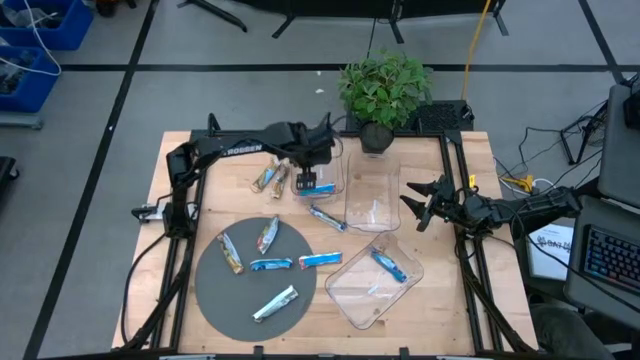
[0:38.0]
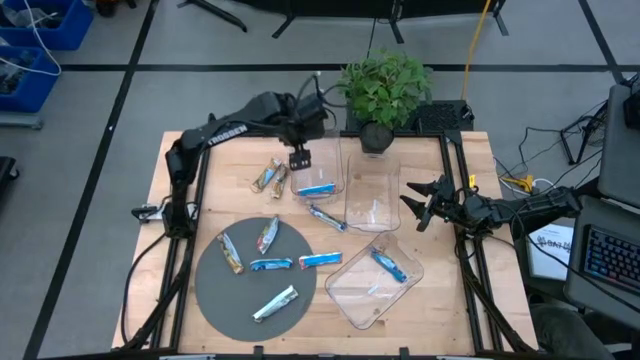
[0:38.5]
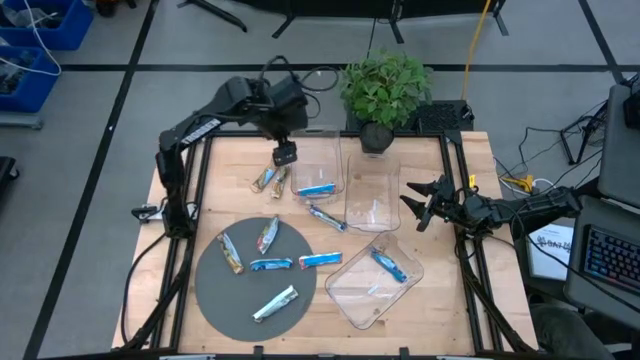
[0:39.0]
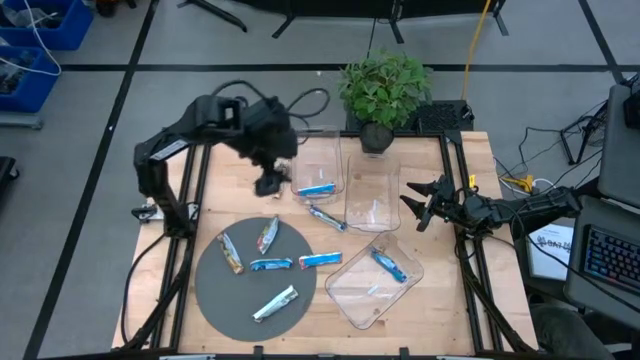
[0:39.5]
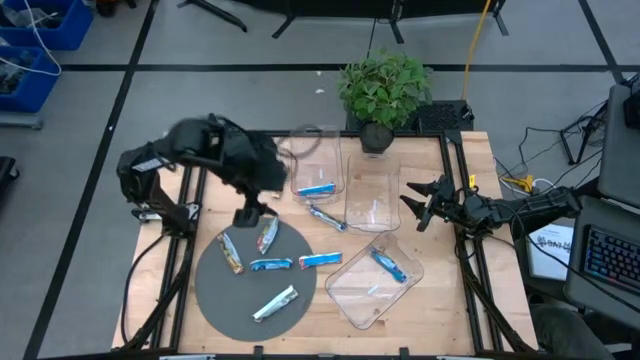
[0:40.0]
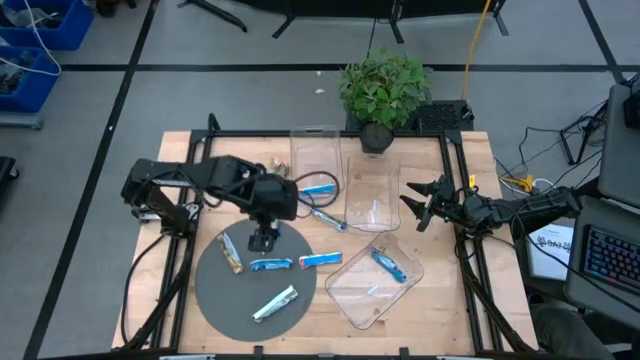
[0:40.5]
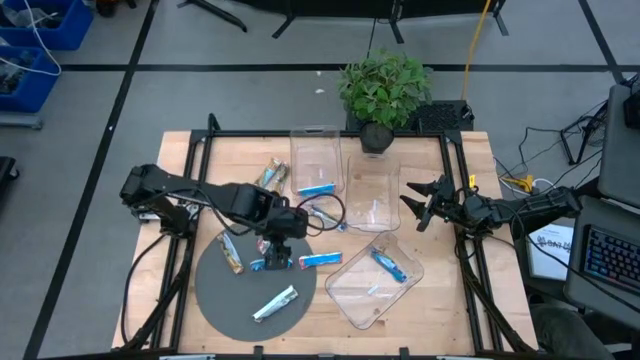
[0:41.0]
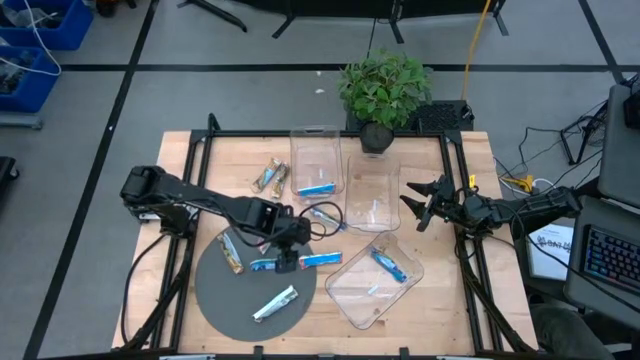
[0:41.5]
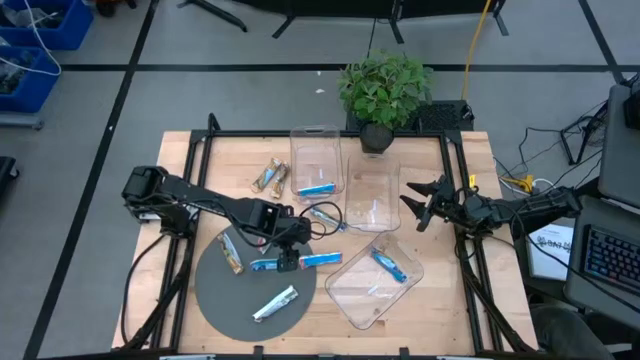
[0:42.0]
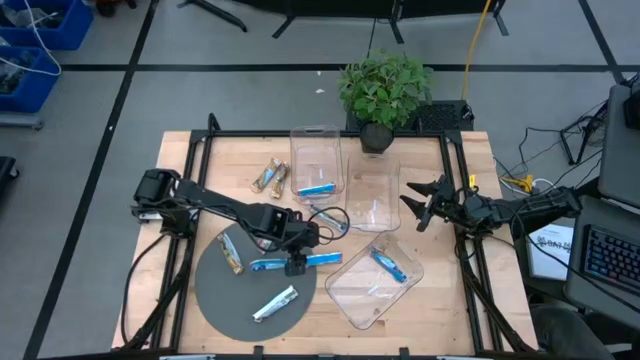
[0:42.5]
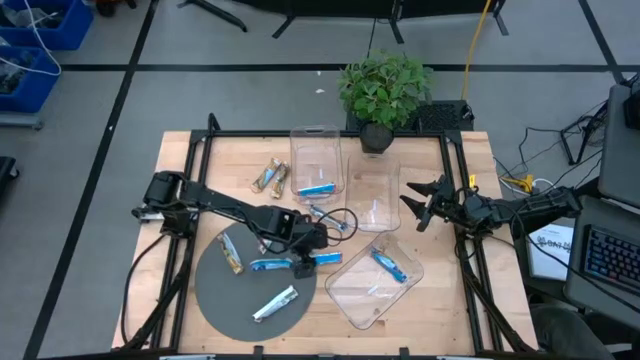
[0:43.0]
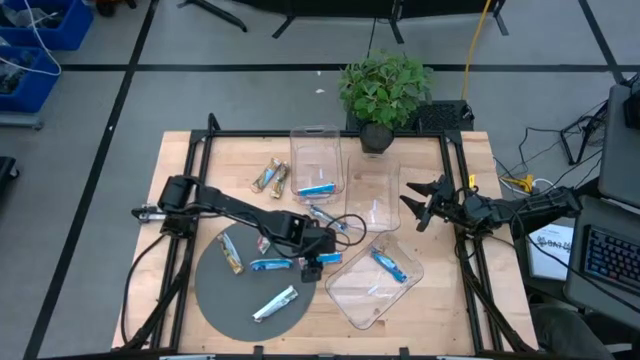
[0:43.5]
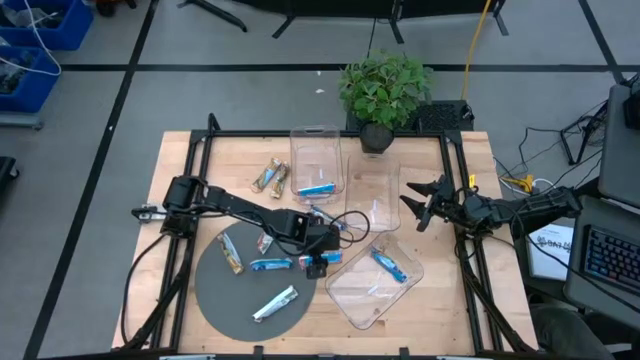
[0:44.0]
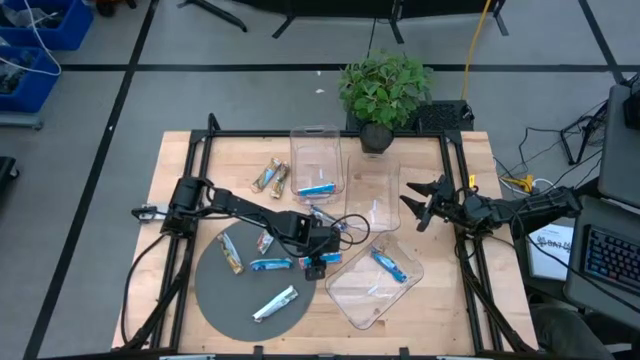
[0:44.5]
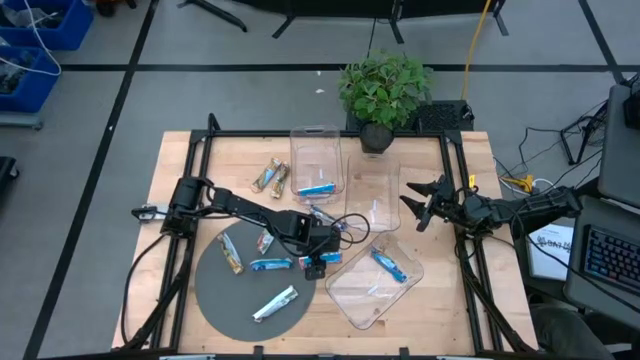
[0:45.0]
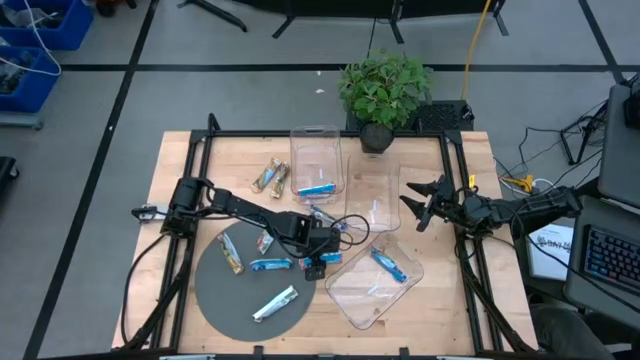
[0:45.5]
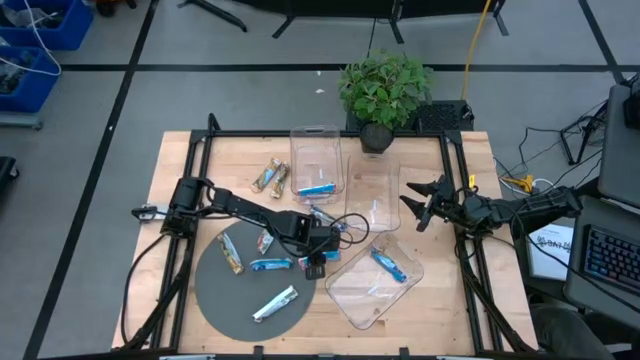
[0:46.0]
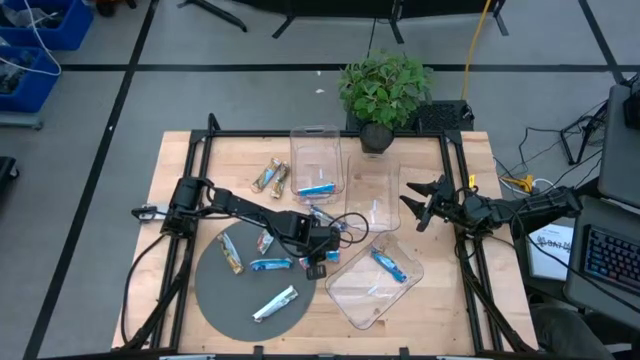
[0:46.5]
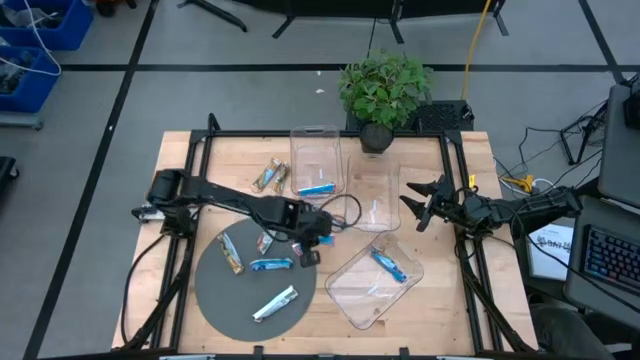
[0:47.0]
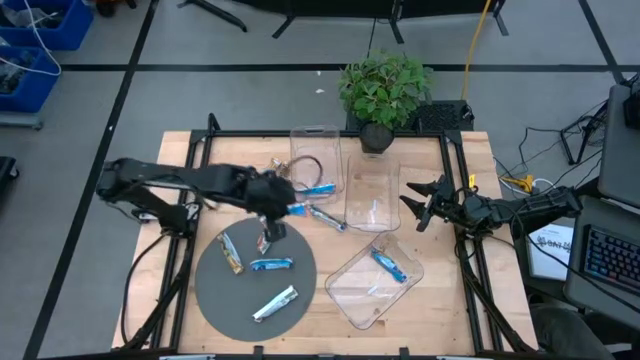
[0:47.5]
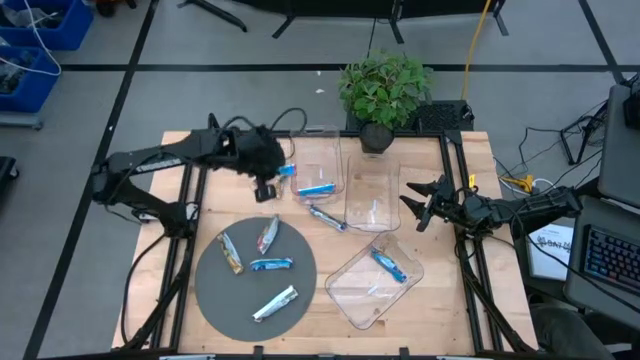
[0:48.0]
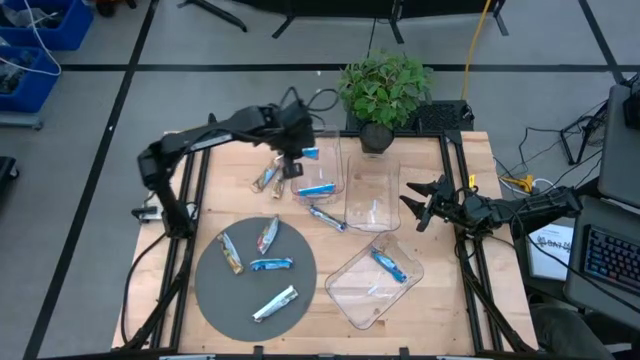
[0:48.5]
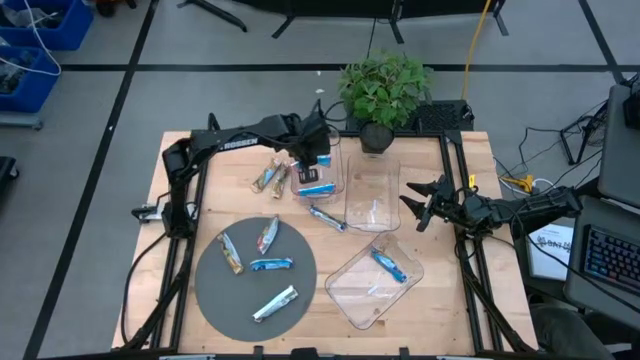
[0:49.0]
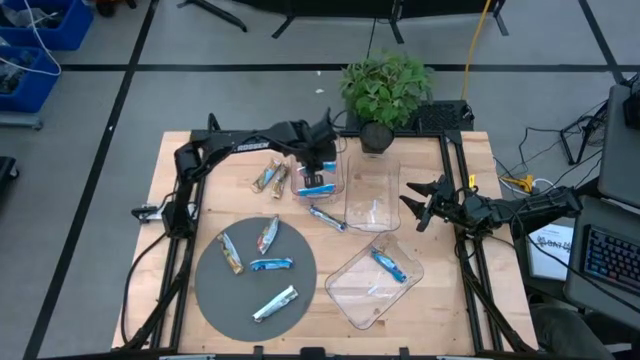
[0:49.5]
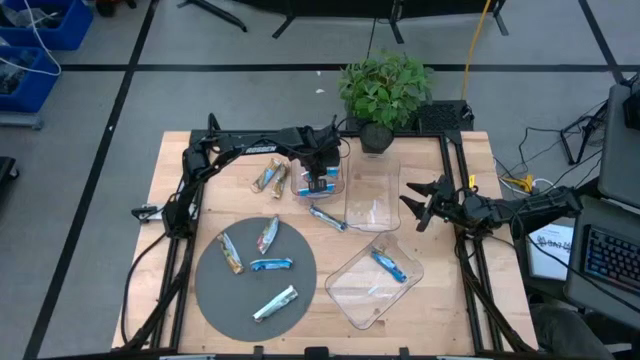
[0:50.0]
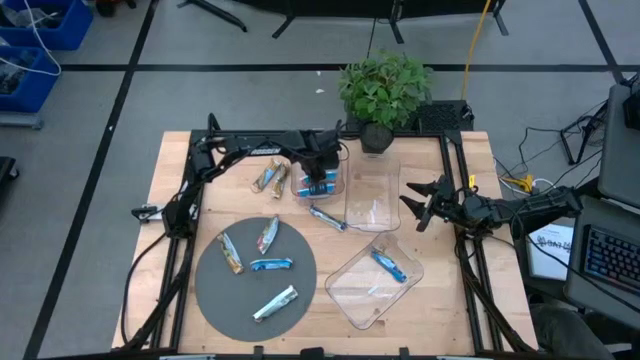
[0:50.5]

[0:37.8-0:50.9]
Task: Pick and place Granola Bars by type
Put the red granola bar into the top transparent bin

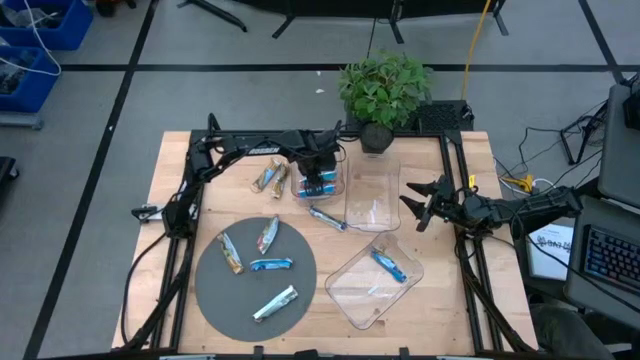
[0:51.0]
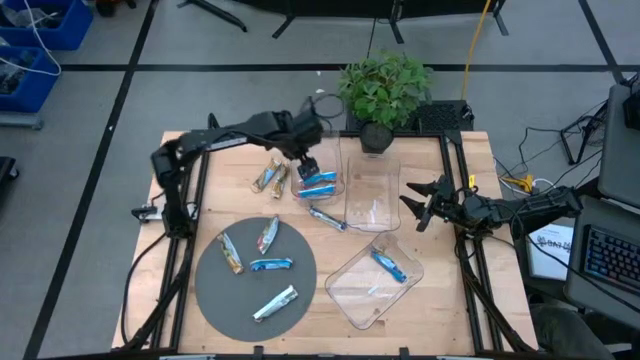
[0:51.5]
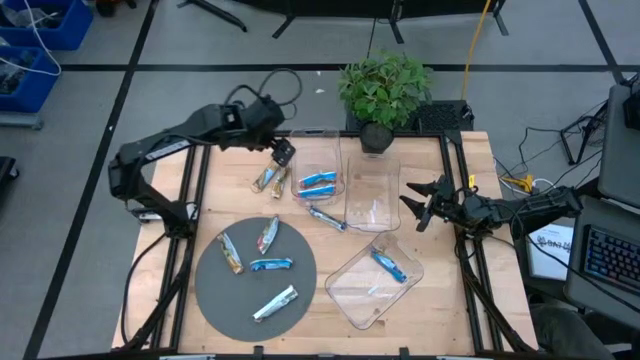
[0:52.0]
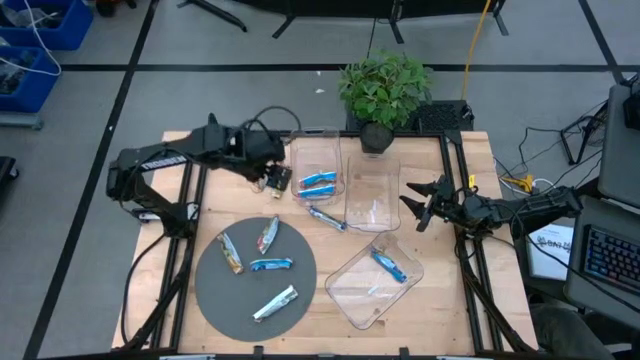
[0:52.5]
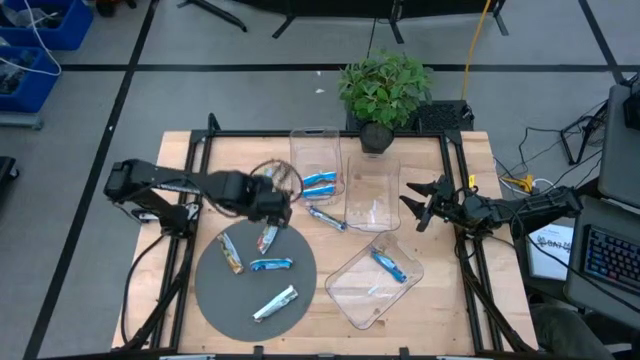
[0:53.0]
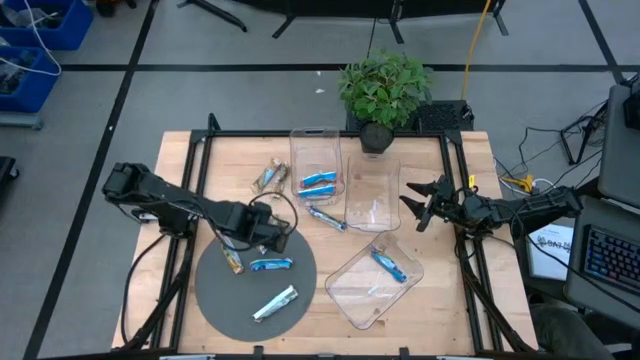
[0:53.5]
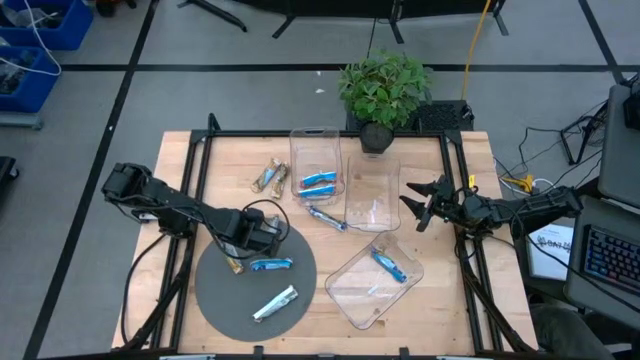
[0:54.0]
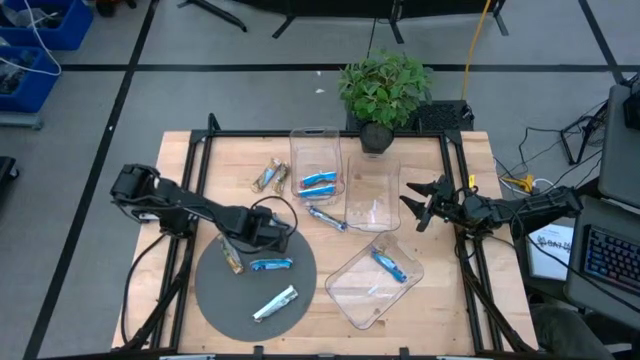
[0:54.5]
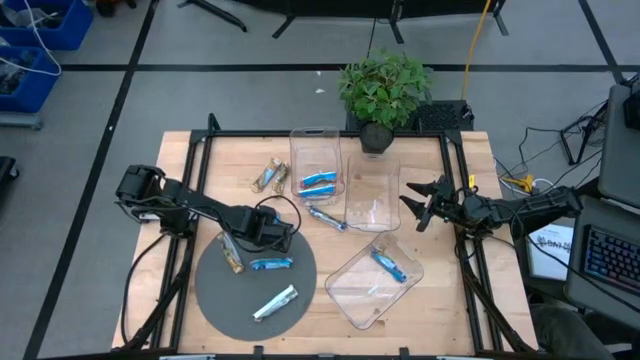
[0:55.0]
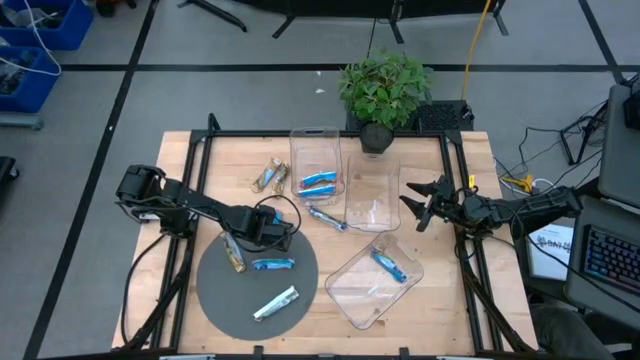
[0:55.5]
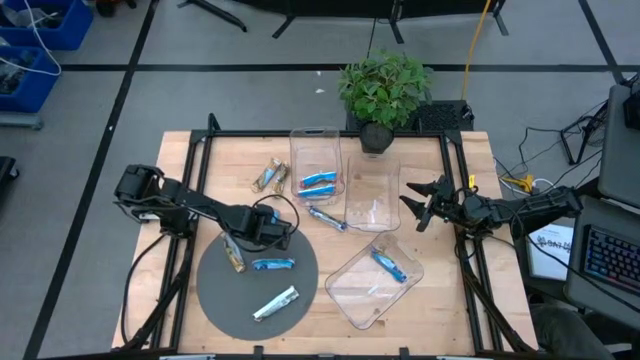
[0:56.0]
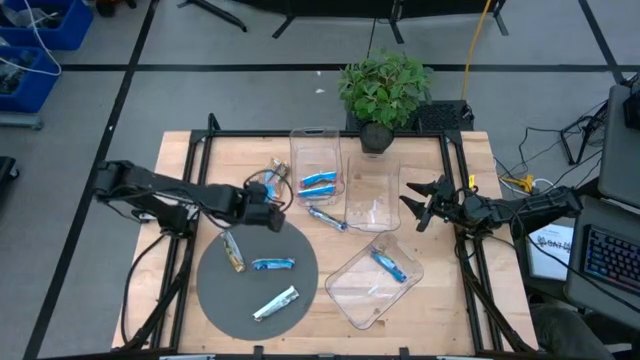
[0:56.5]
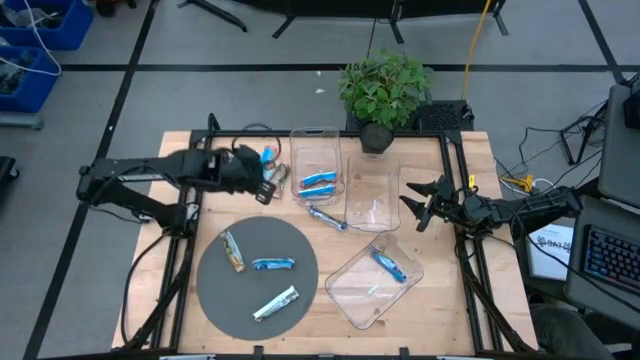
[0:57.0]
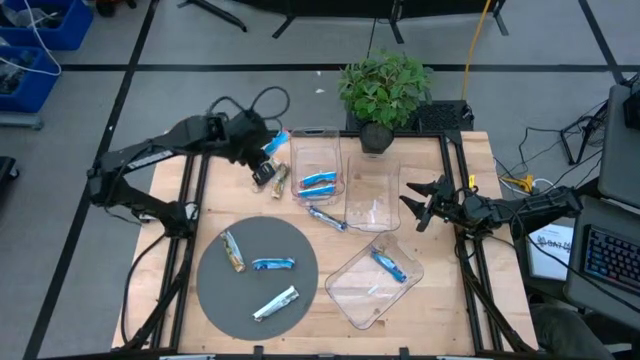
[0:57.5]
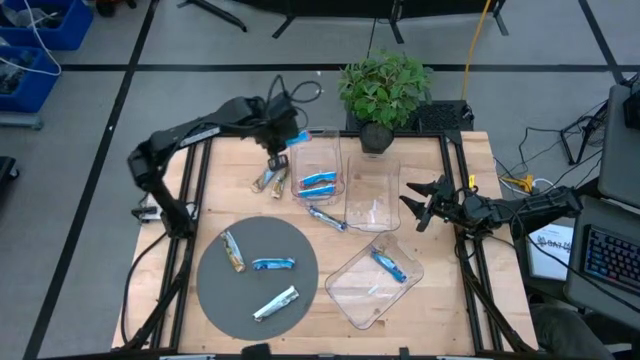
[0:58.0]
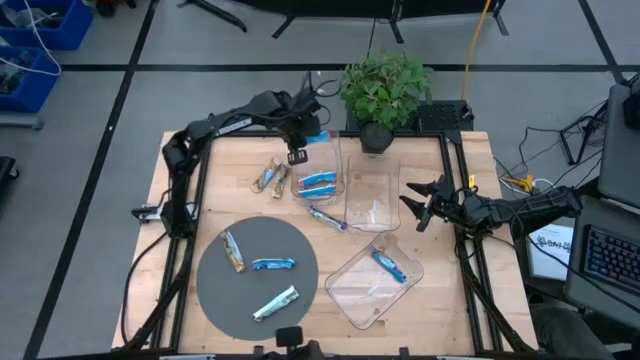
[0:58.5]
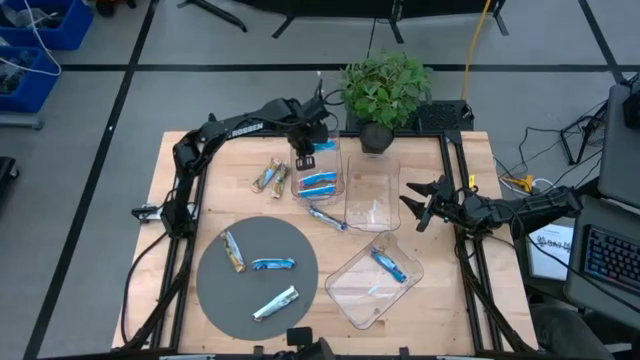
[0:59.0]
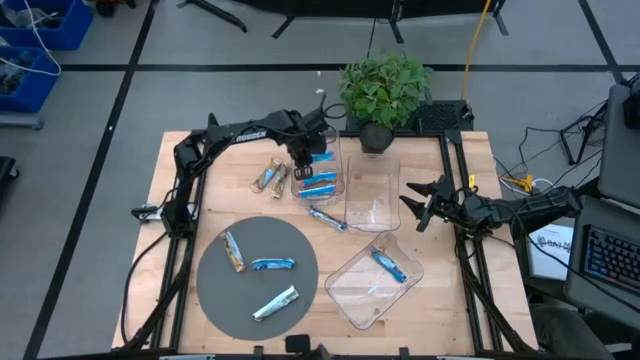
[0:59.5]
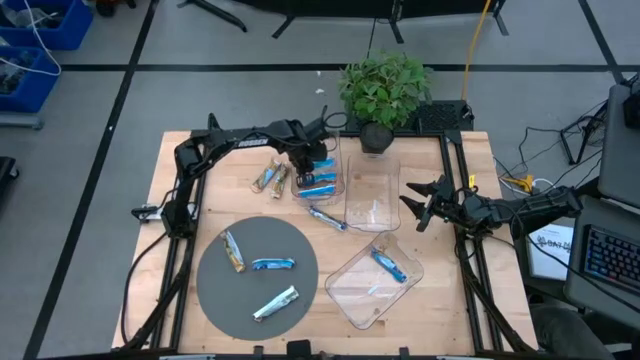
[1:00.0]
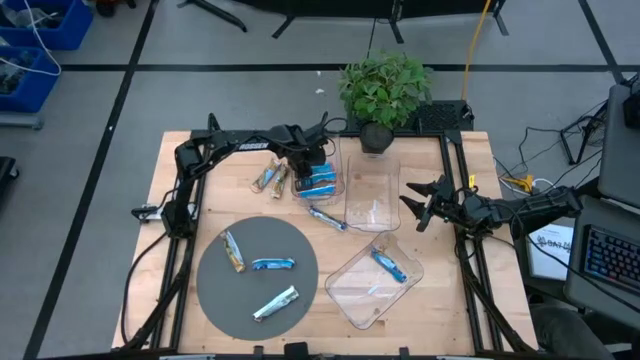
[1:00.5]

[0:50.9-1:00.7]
Put the red granola bar into the top transparent bin
